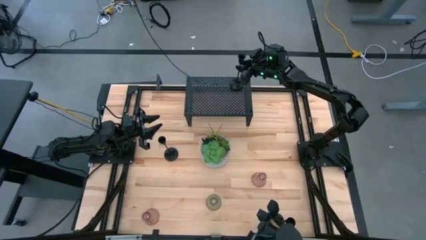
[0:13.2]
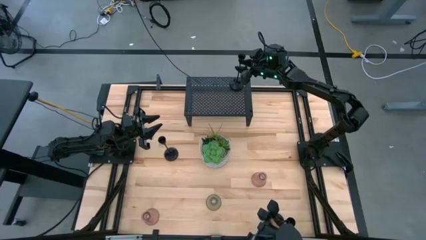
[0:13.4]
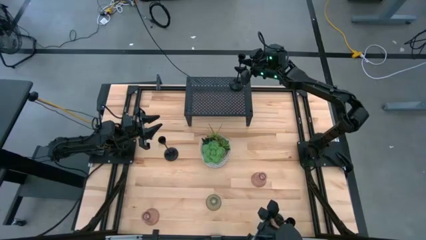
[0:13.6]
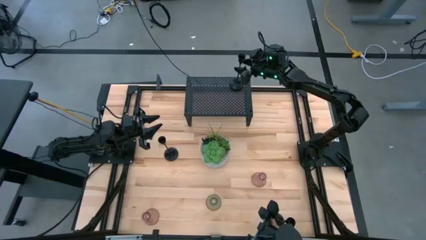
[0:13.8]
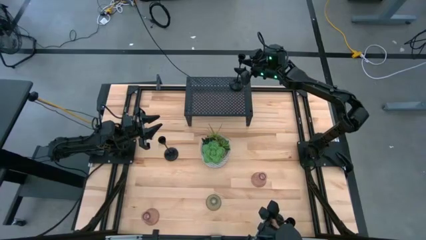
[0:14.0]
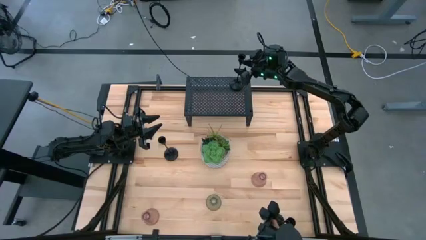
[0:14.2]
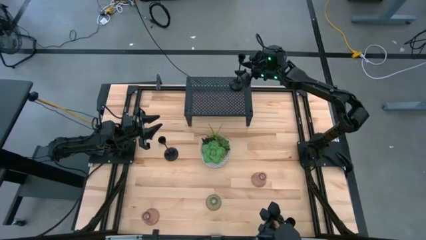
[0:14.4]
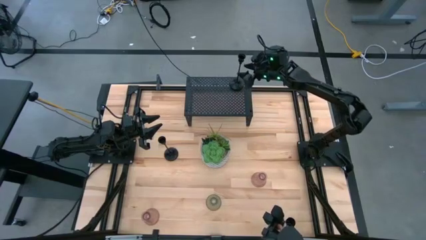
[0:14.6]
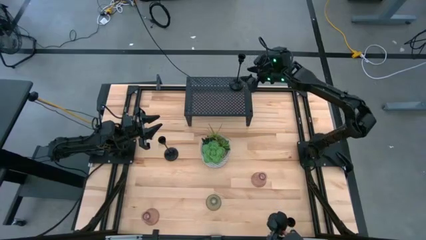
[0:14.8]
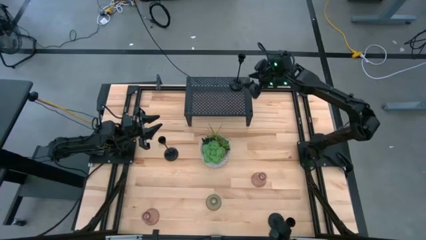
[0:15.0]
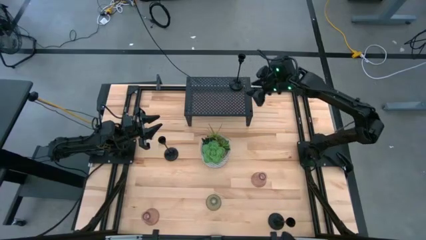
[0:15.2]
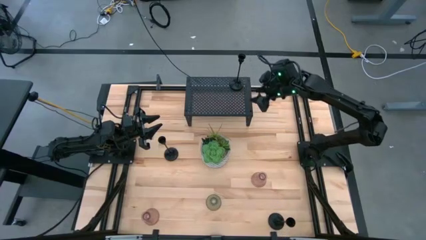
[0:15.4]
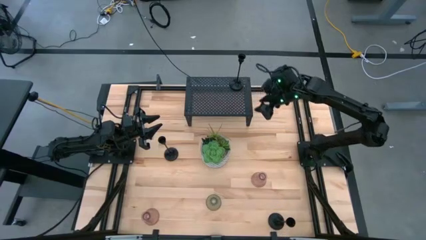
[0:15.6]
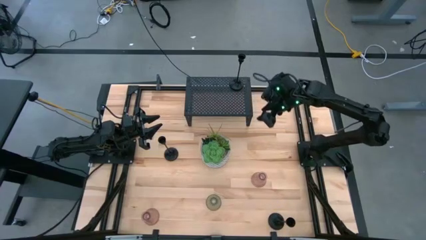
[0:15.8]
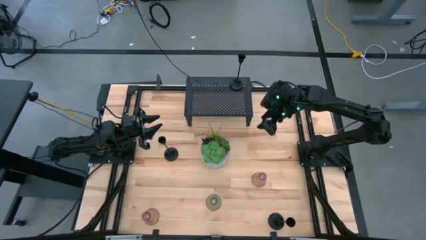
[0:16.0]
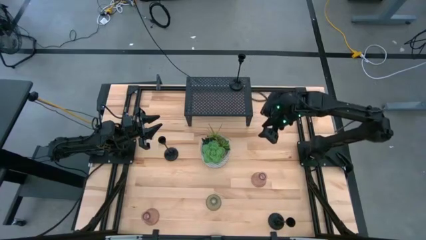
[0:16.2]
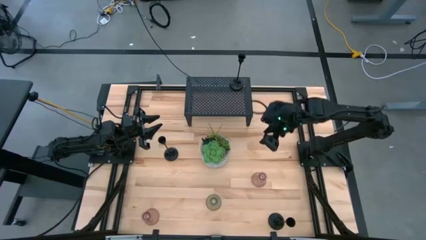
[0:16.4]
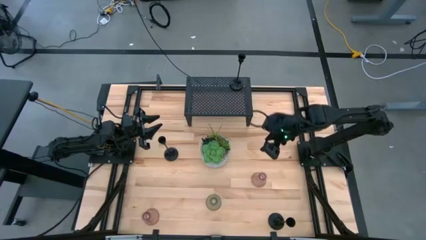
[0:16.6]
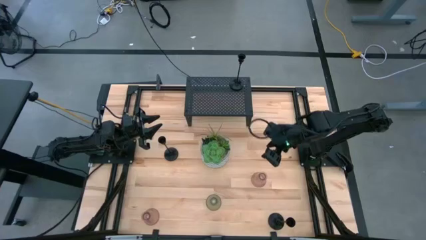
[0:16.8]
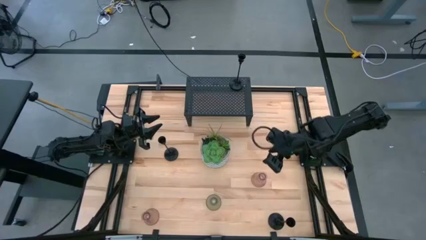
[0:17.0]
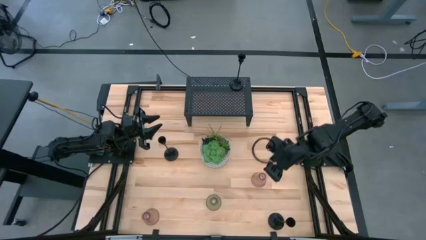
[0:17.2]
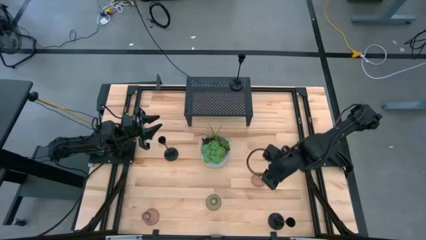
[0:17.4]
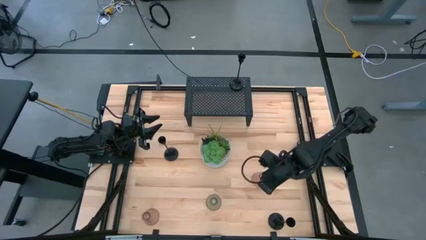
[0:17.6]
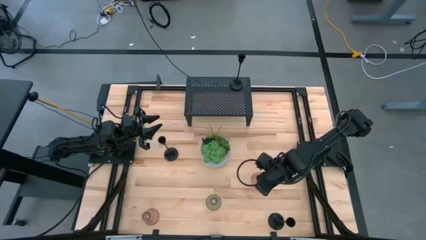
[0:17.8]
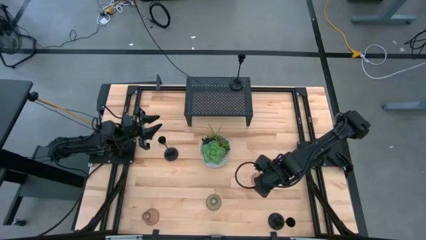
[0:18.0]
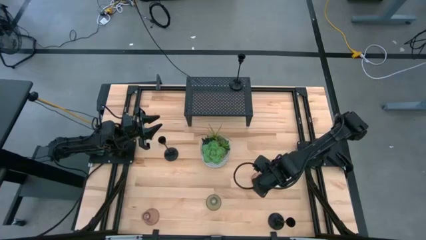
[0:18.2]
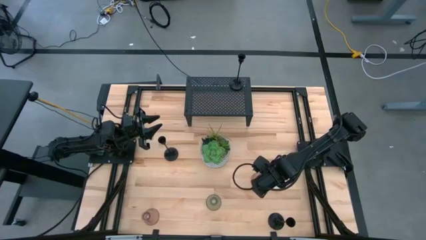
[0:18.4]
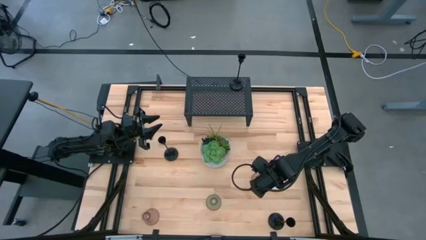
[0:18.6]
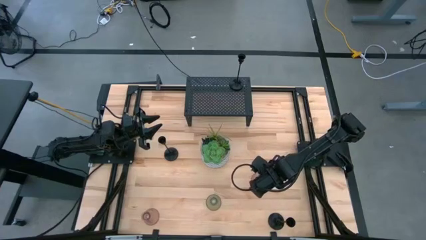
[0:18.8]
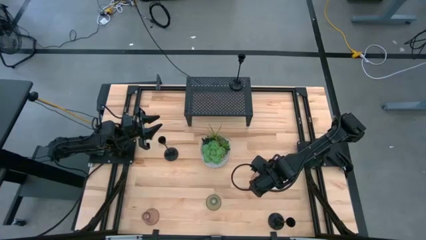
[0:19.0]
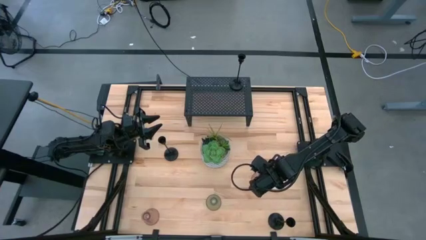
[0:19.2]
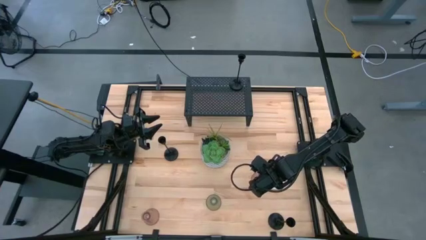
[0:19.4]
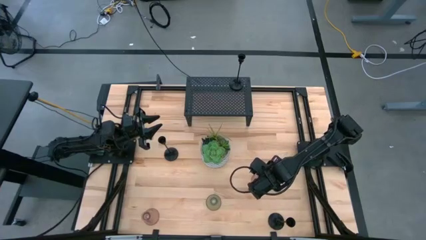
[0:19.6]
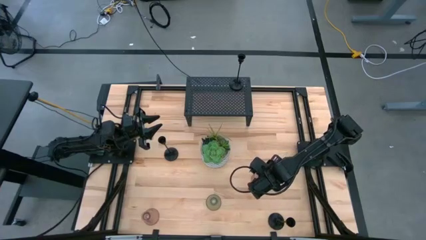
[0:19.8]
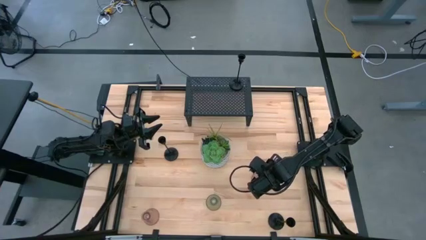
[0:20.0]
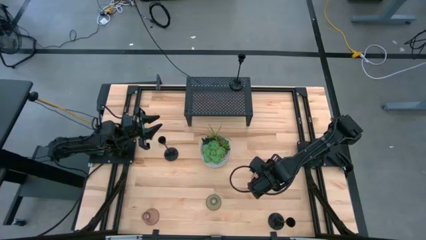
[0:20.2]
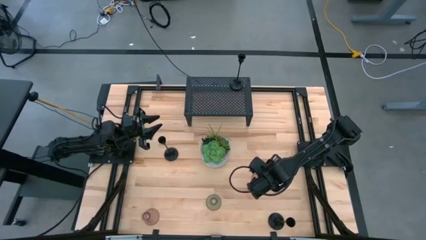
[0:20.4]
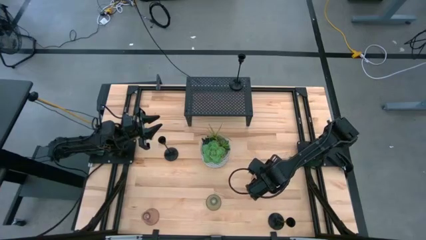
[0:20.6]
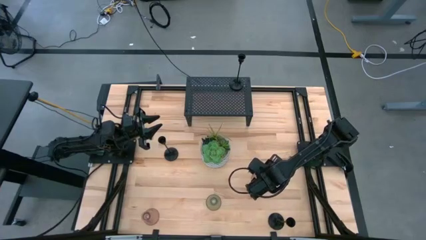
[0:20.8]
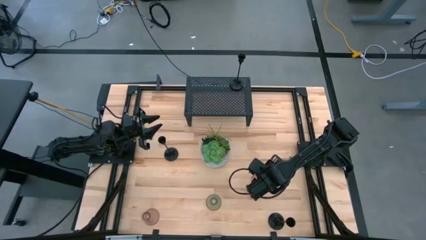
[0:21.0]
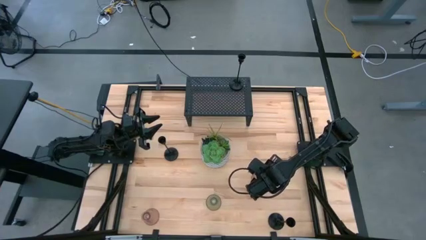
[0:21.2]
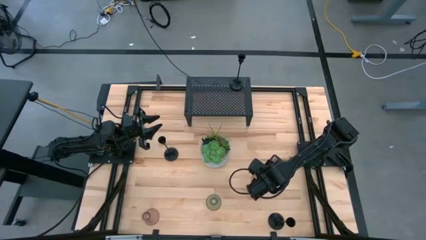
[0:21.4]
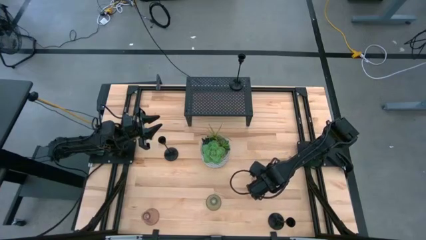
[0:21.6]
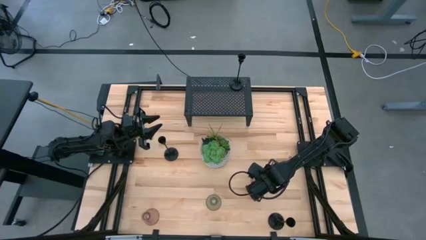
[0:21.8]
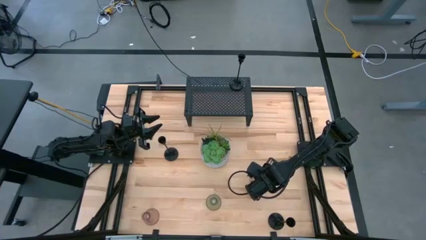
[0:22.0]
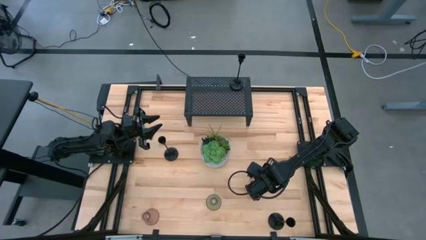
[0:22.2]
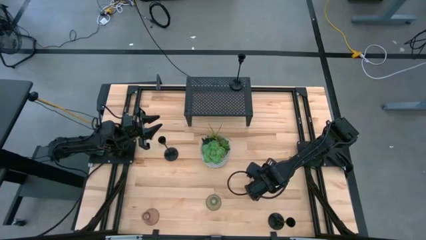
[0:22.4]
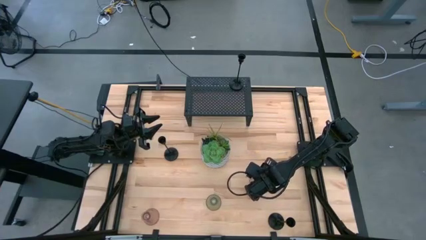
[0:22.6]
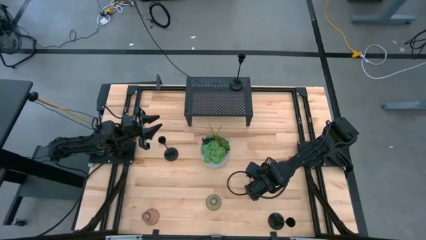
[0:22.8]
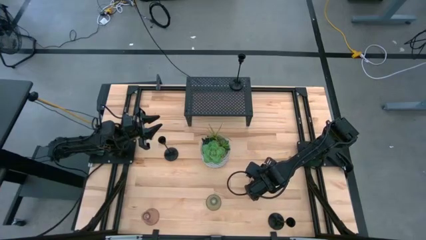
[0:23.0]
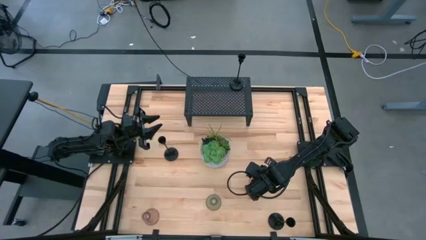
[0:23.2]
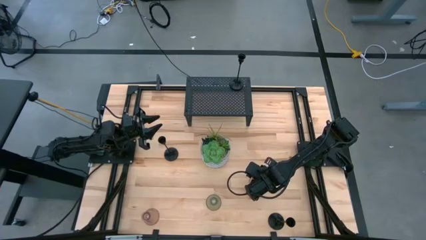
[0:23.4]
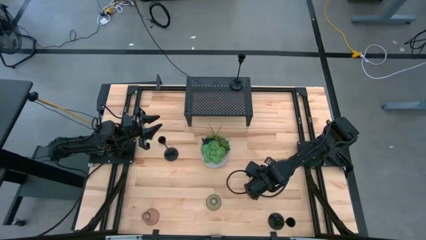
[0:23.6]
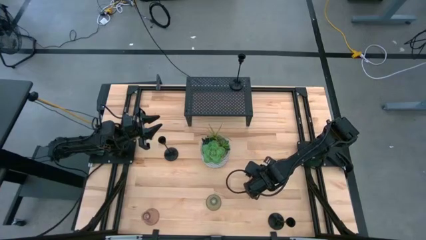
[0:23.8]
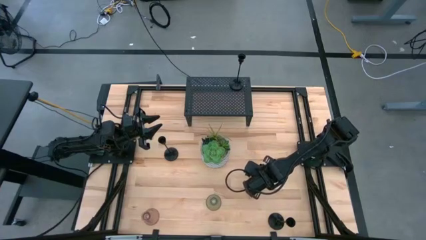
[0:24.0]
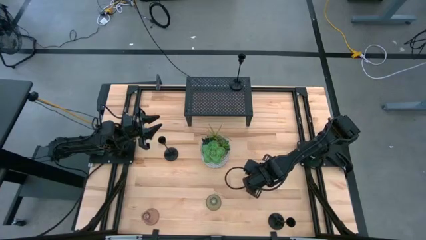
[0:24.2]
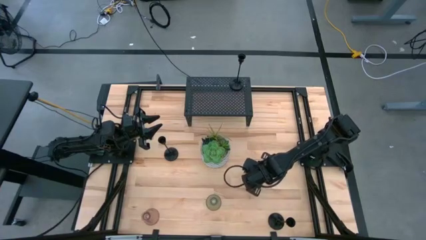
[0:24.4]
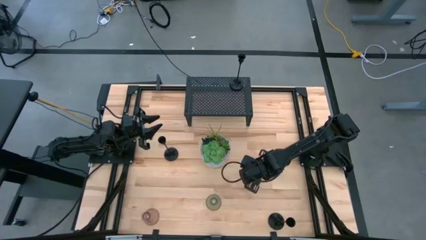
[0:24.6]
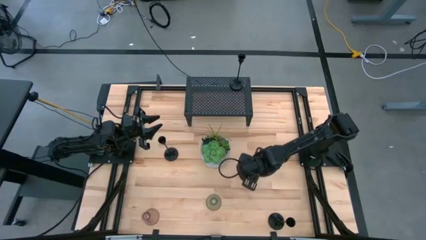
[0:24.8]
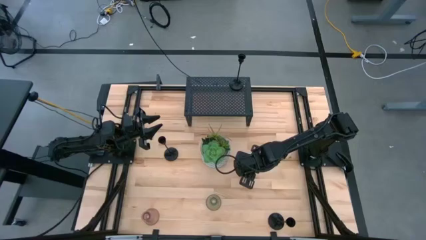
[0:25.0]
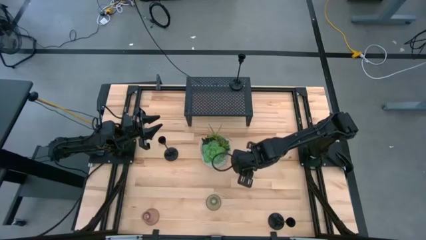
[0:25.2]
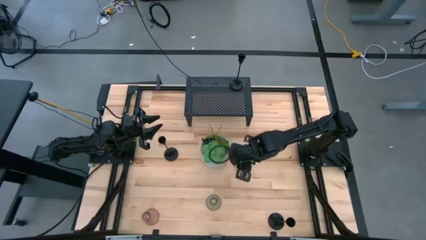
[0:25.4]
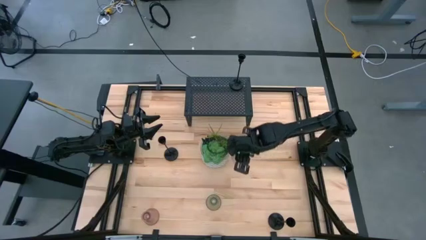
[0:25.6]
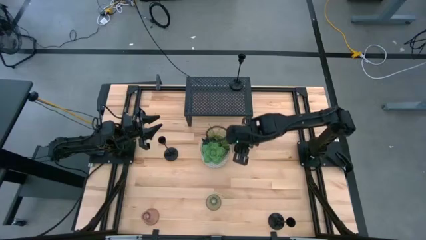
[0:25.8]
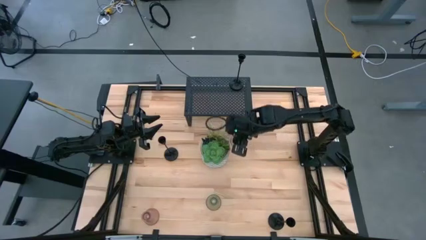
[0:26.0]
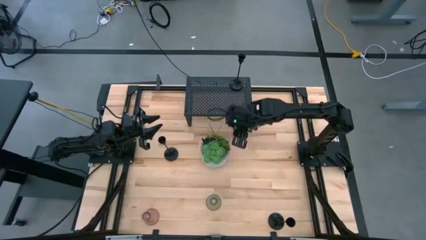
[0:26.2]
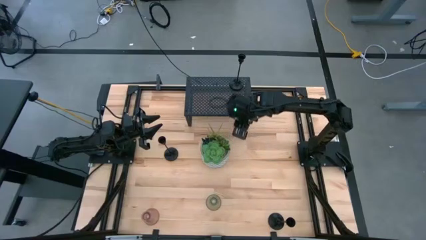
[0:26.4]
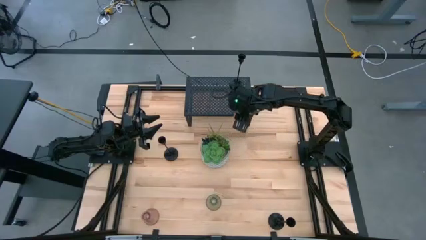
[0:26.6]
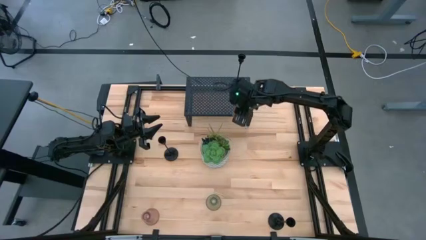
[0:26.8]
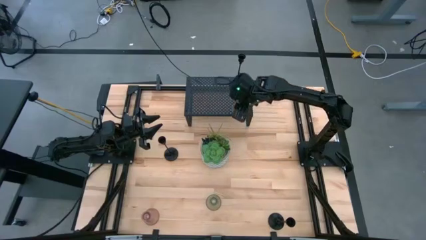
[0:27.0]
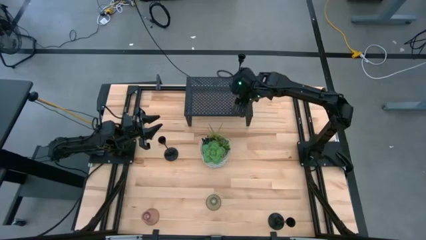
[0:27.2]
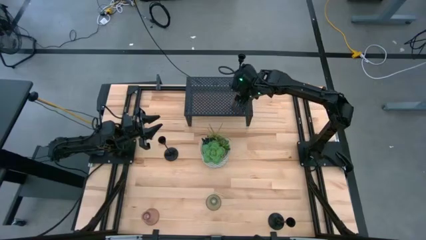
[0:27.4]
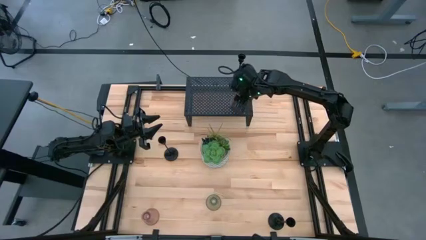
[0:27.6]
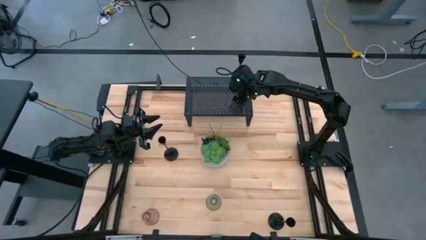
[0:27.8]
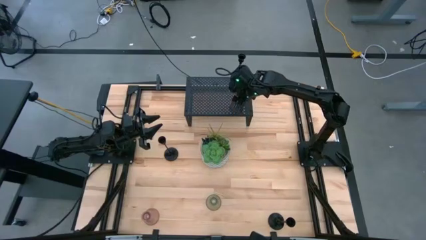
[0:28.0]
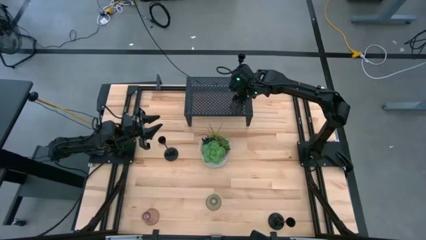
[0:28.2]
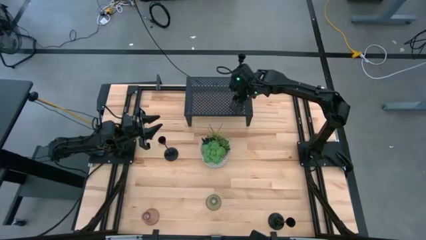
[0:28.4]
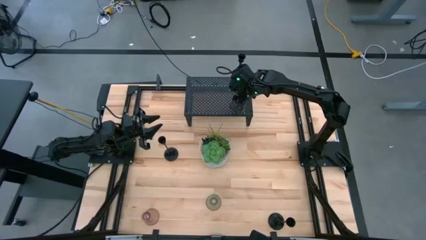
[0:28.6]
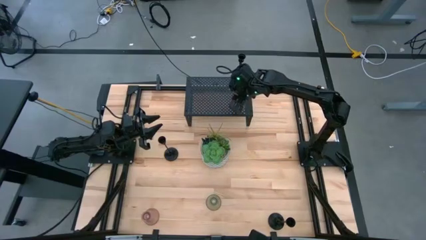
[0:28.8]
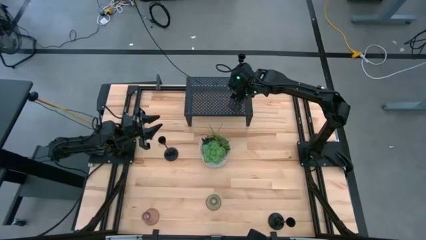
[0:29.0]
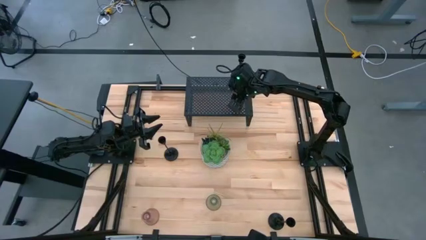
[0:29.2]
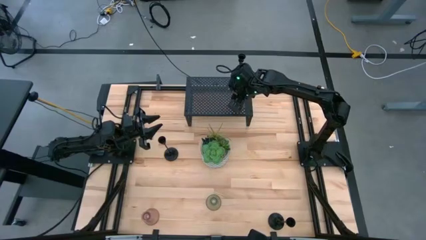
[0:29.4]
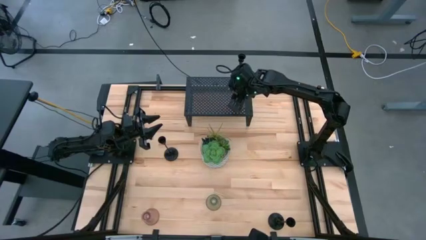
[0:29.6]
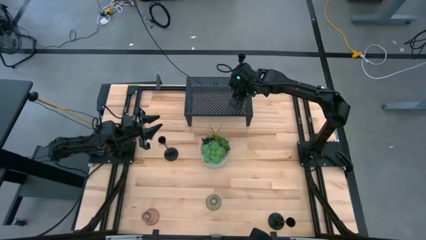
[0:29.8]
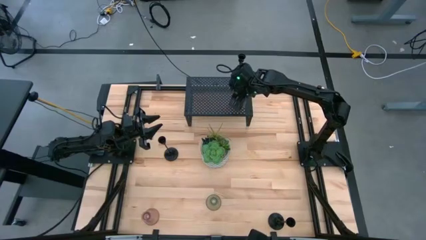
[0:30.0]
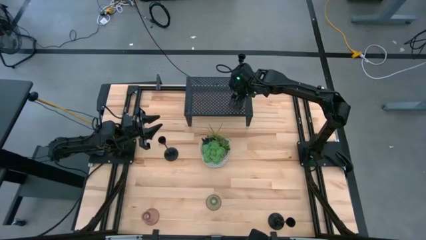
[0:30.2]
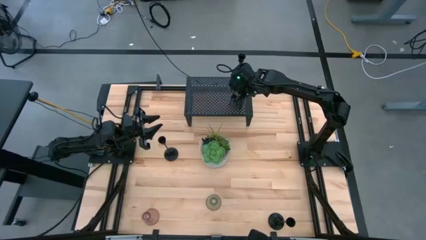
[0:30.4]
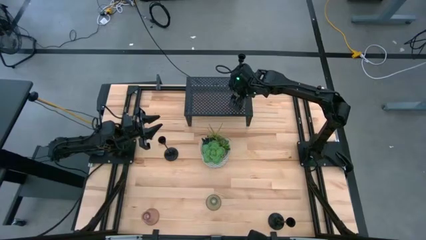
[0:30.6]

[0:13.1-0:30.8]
Task: Pick & Place candle stick holders
Put the pink glass candle holder on the shelf aligned with the black candle holder
